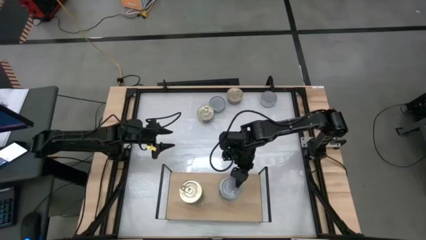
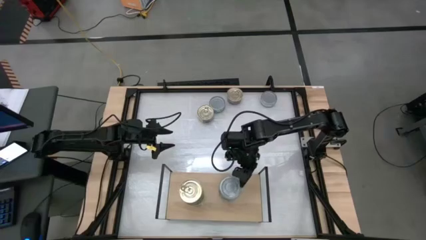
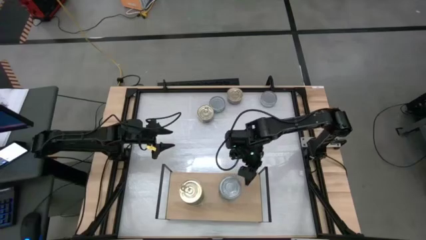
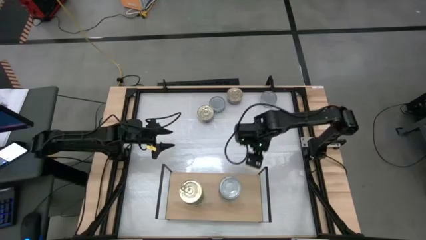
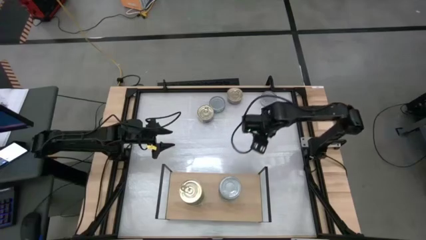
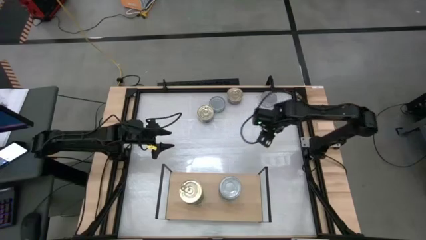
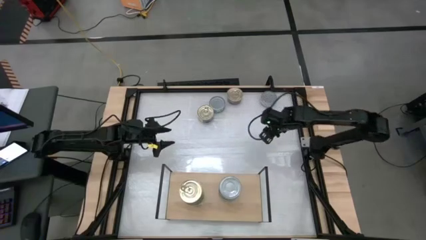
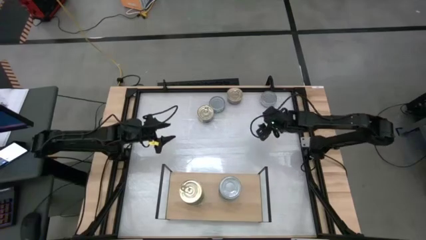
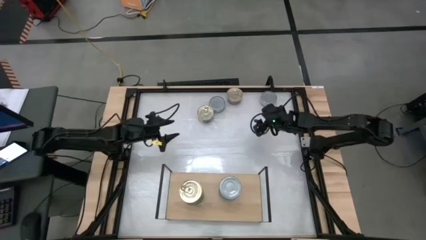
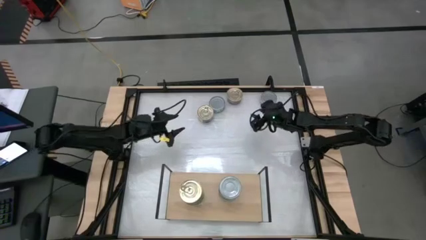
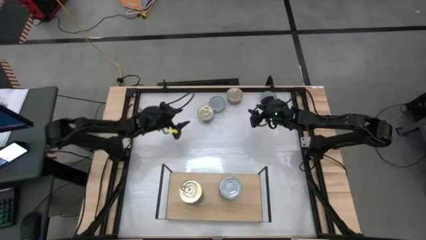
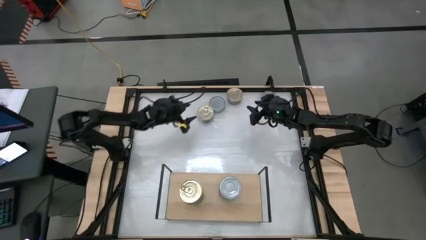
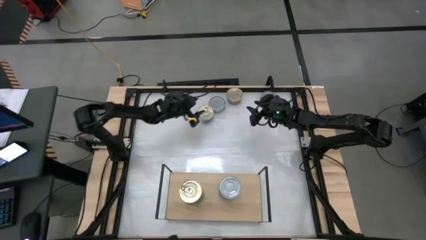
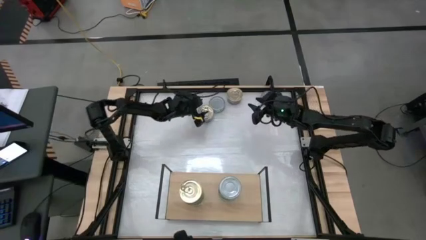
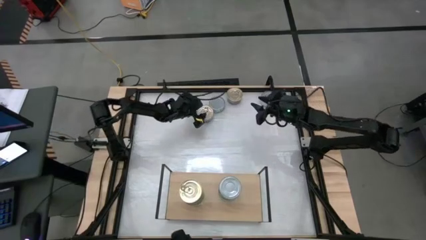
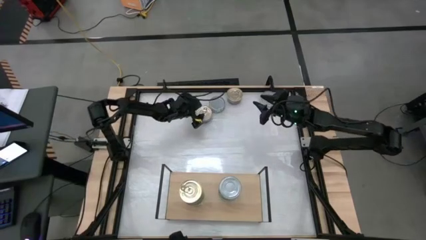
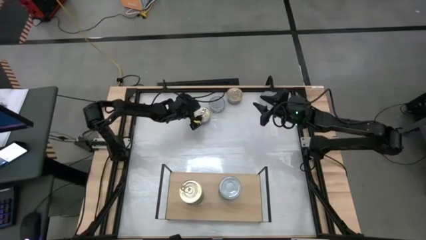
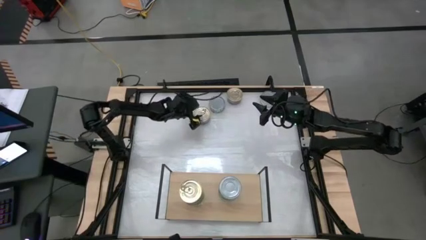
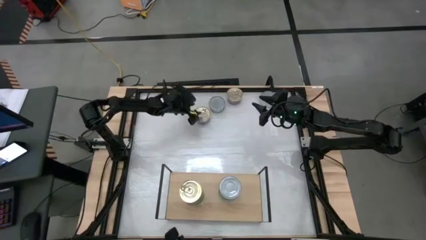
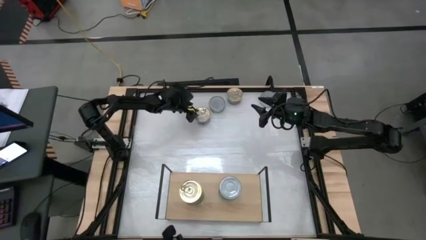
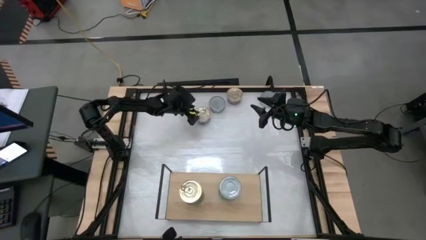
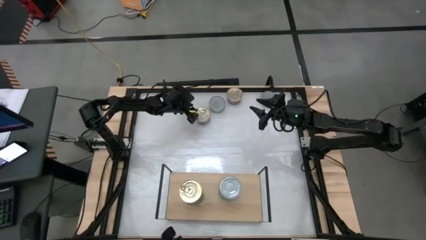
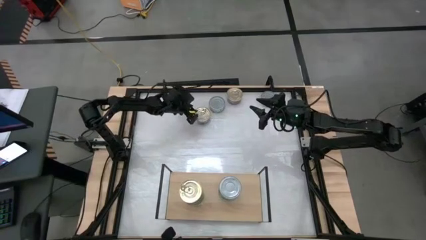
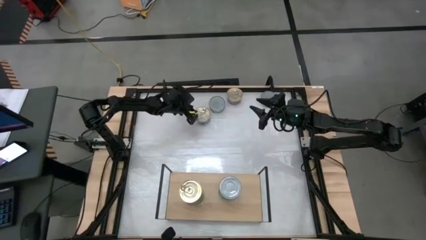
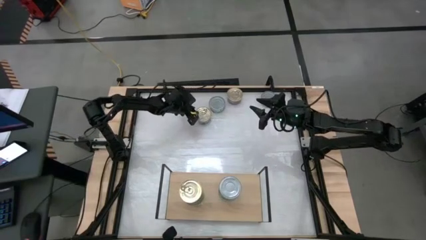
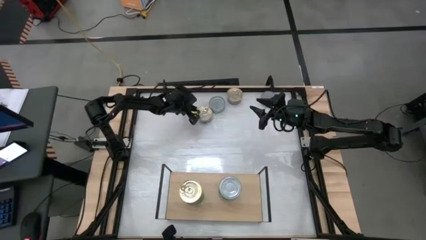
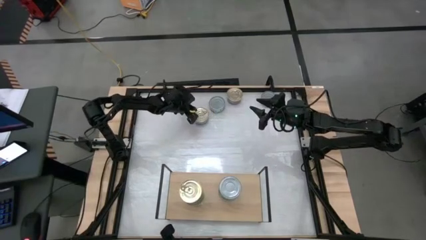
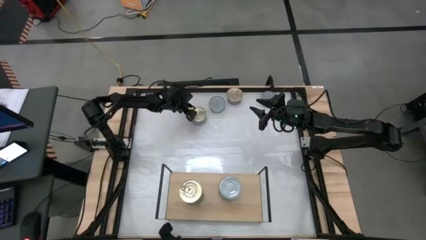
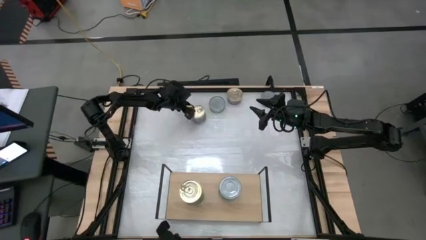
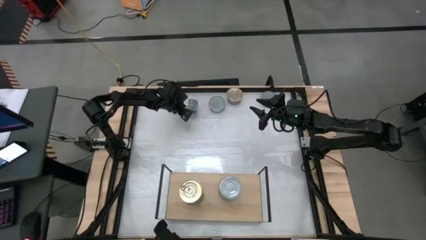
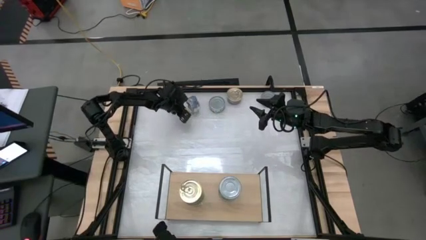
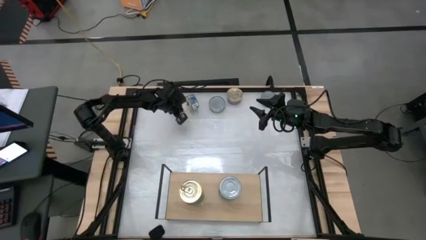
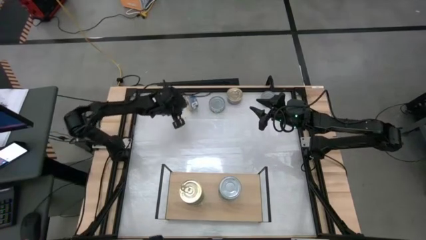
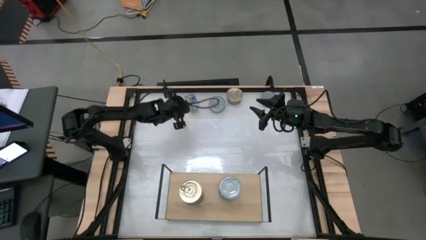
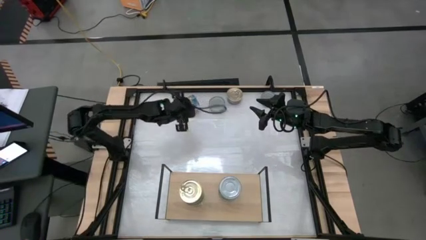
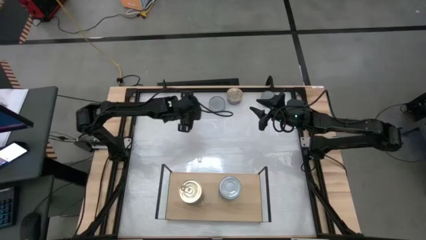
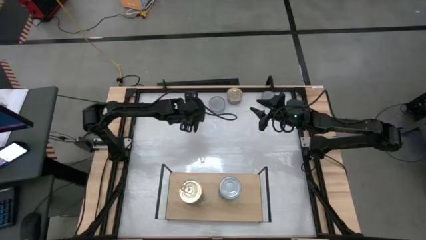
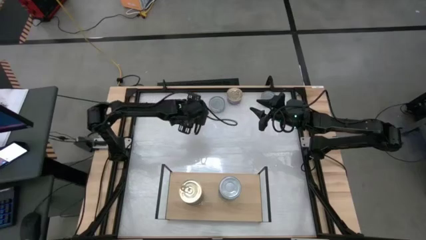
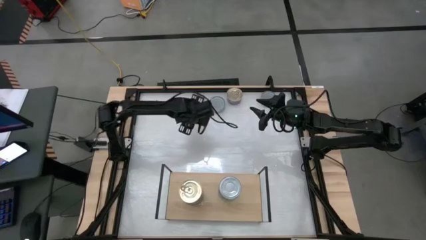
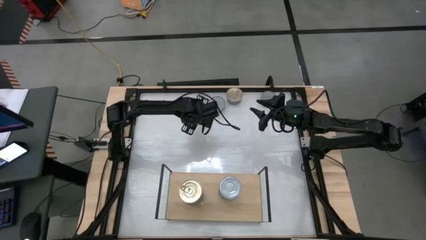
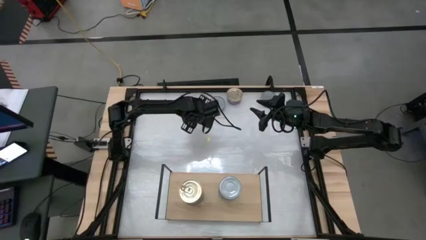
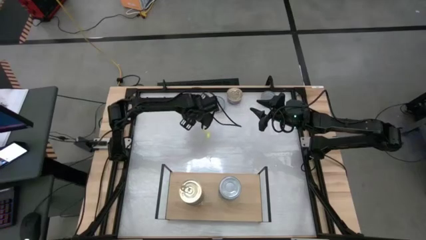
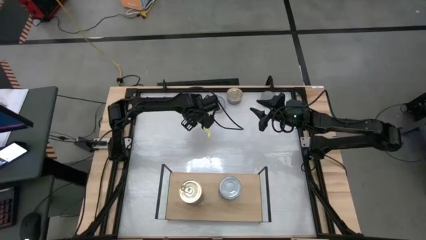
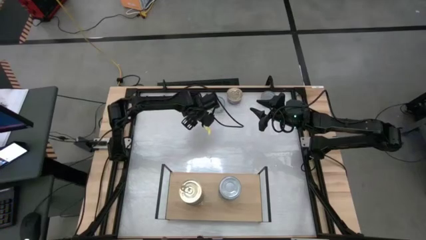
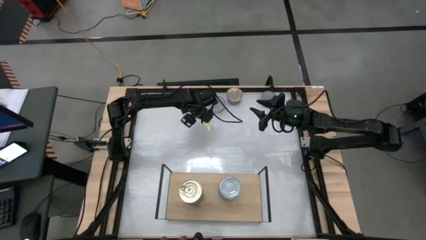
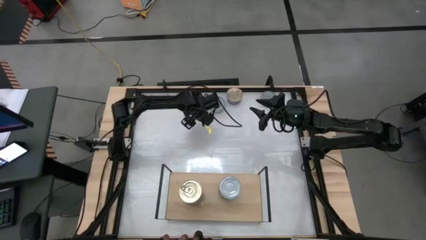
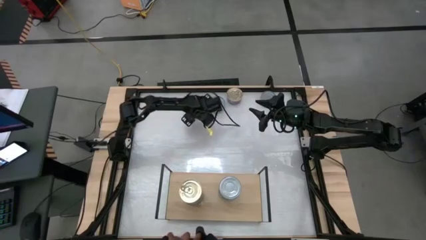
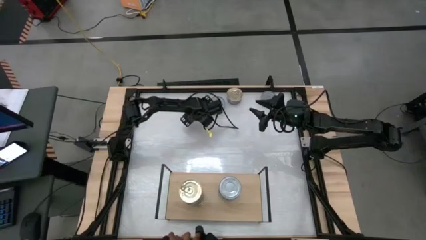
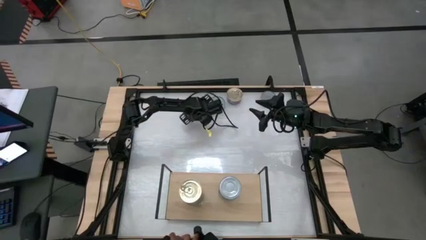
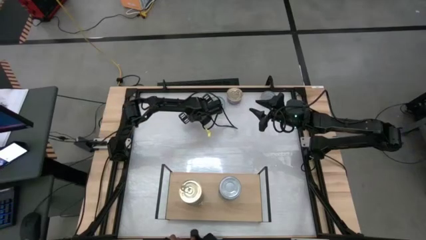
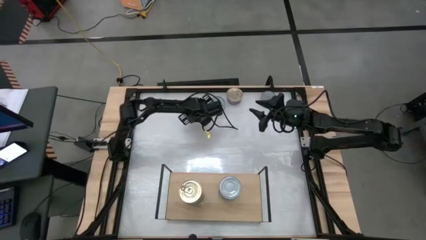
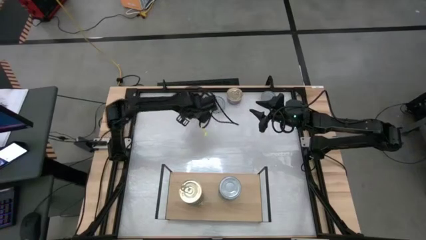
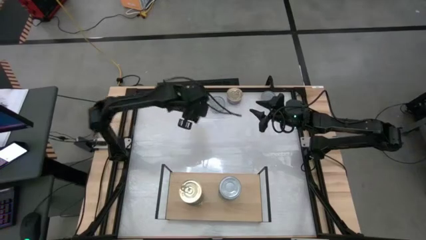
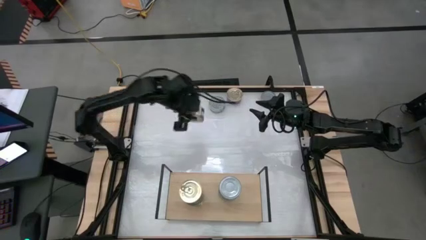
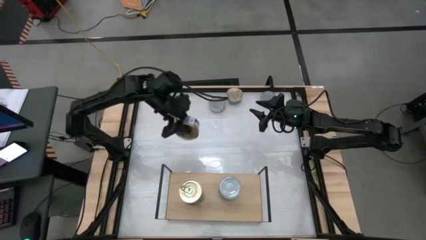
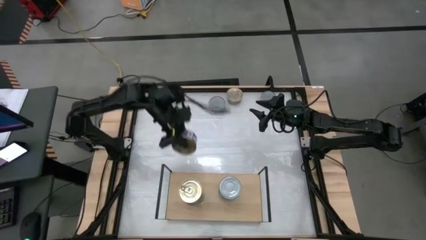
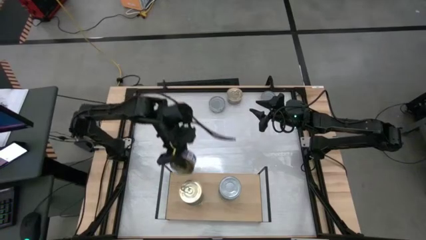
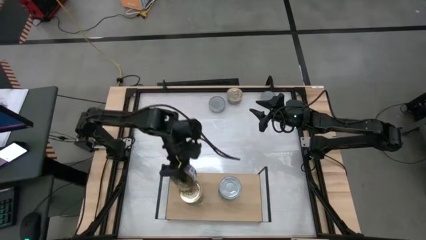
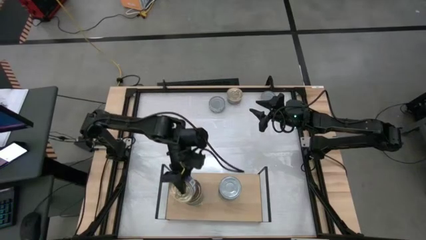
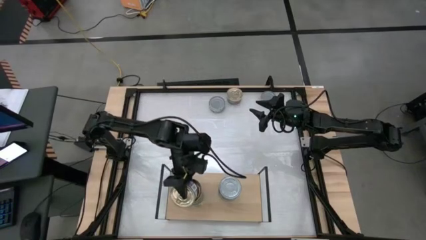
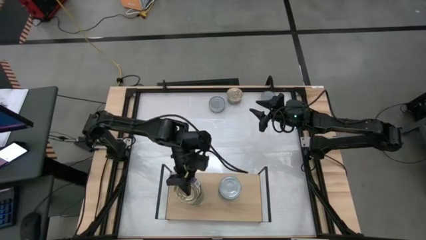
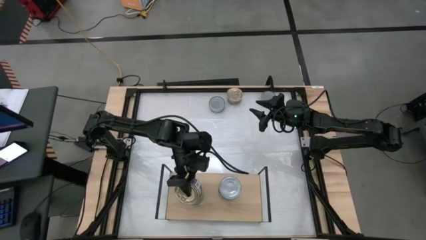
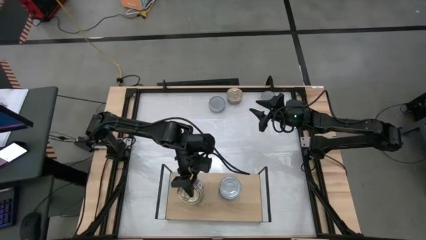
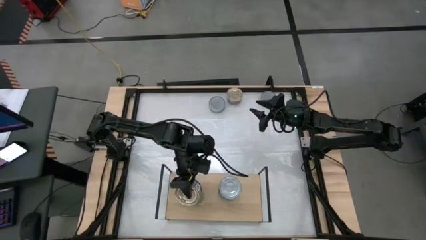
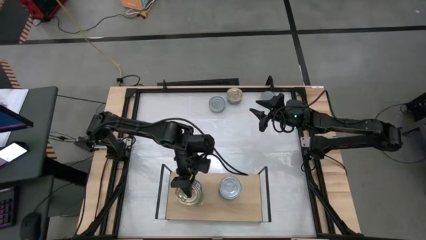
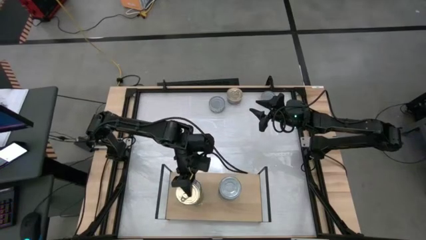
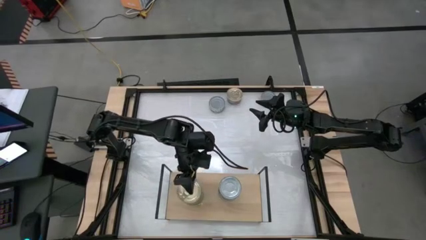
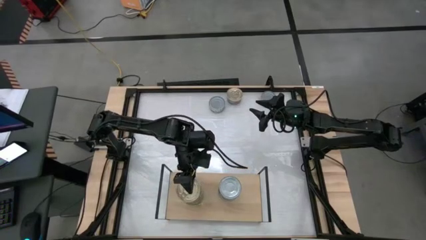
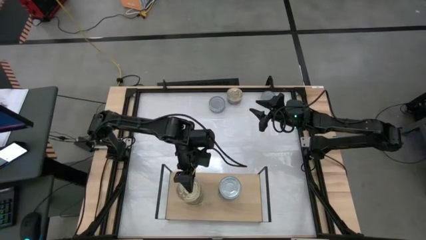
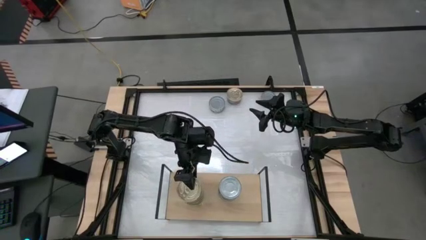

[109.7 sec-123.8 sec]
Task: Stack canned seafood by type on shelf
Stack the blue tuna can on top of the blue tuna can on the shelf

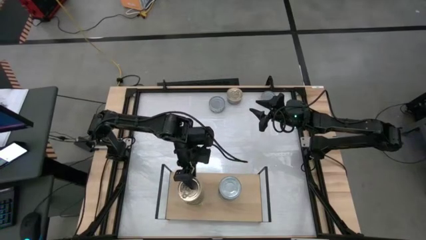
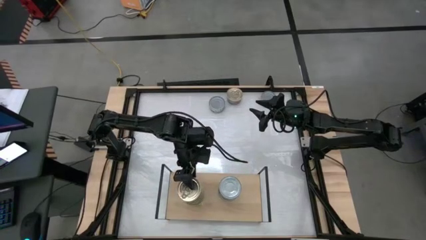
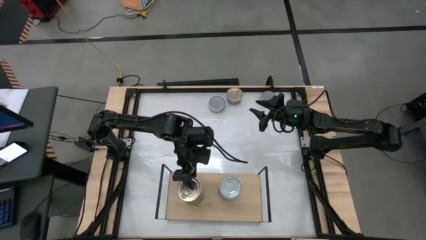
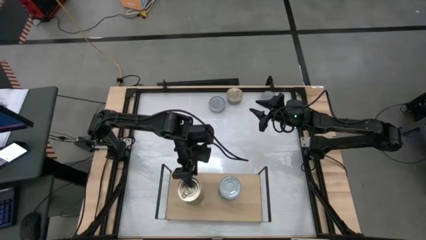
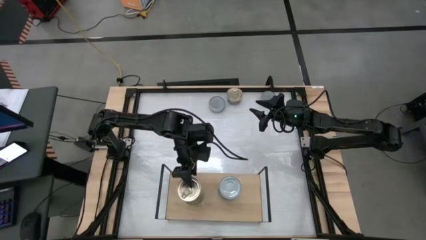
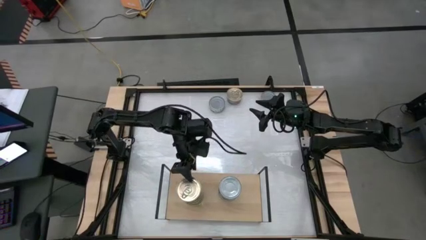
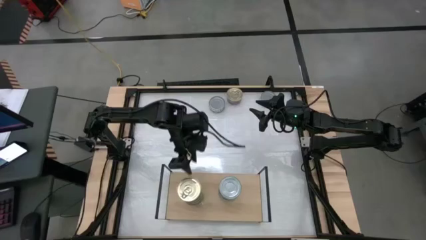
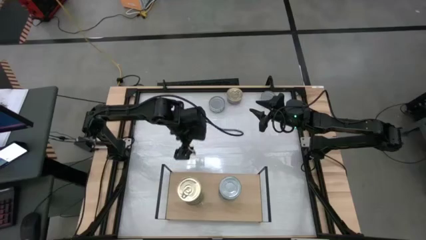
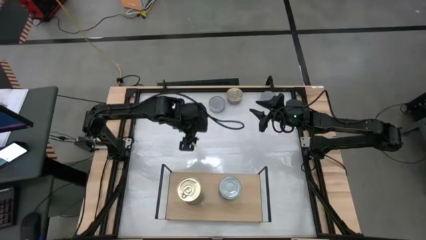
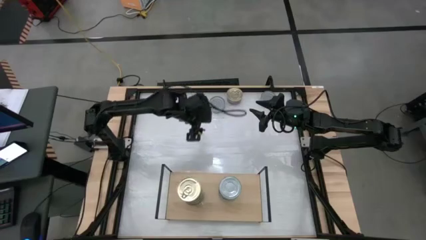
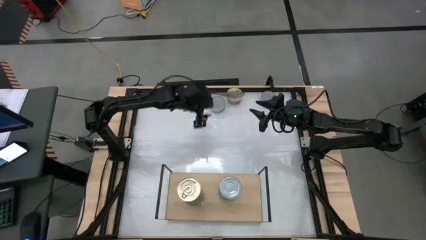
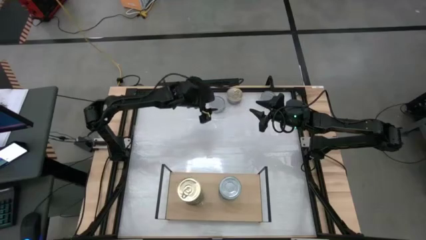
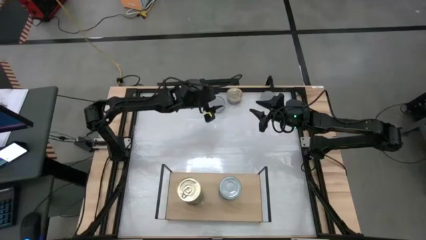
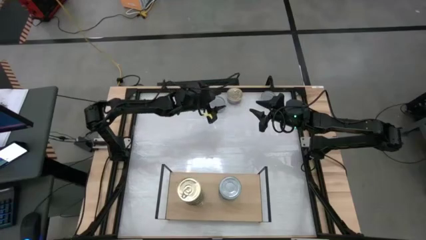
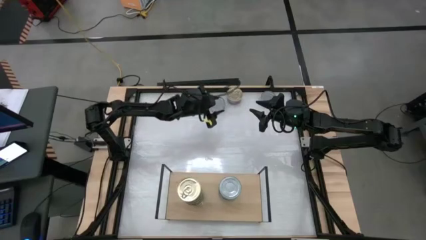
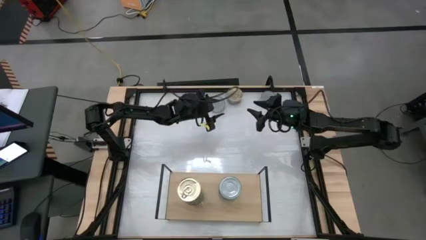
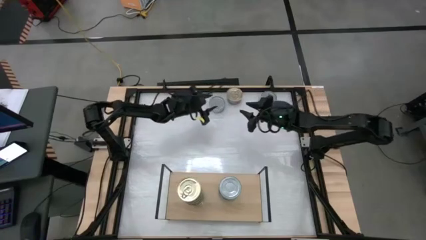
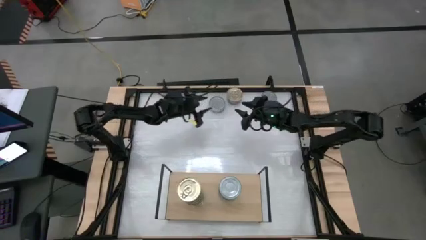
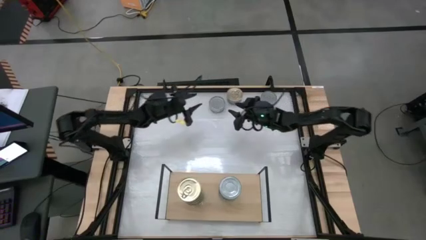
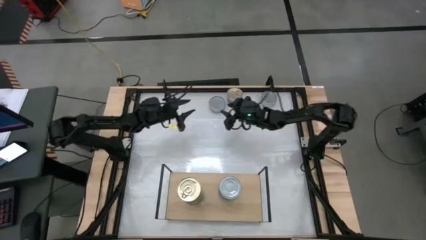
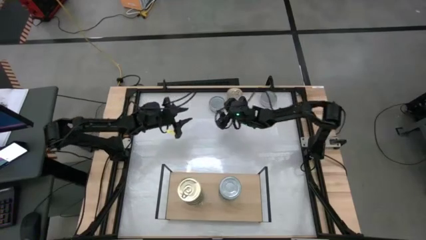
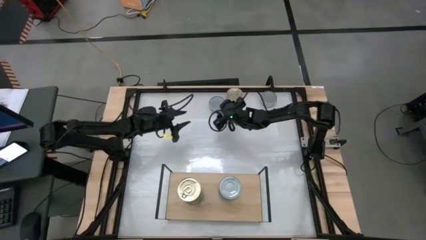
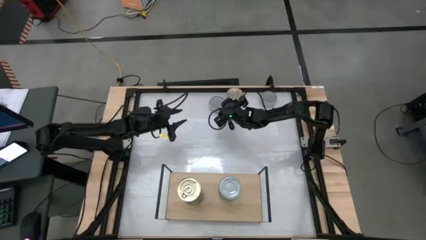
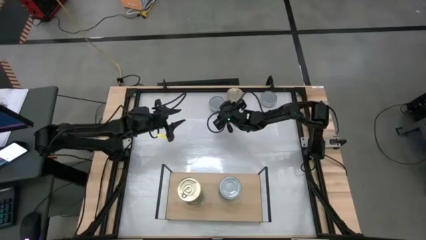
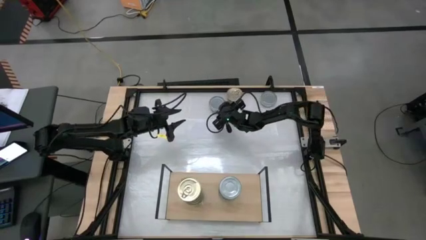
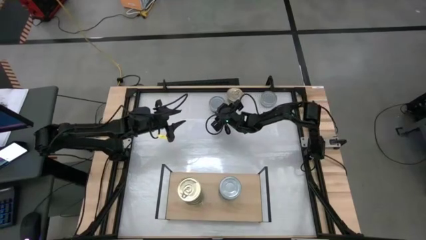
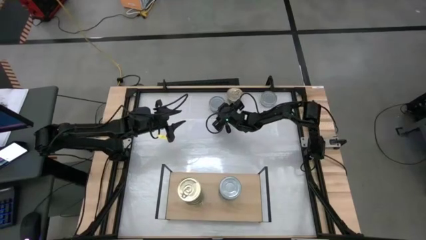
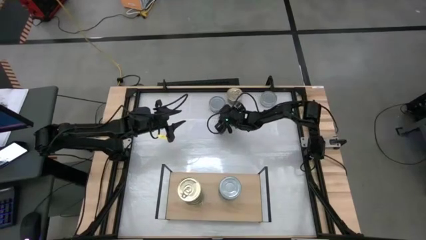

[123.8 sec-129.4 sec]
Stack the green tuna can on top of the green tuna can on the shelf
